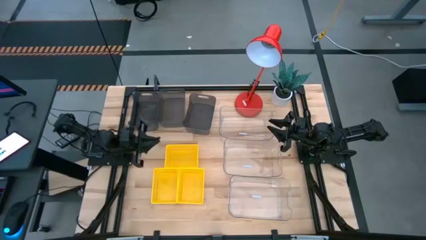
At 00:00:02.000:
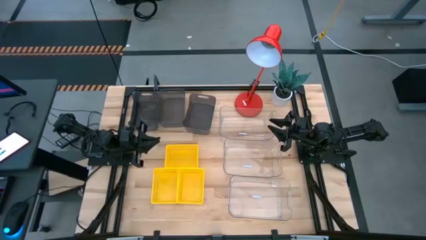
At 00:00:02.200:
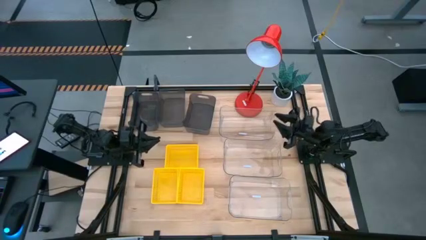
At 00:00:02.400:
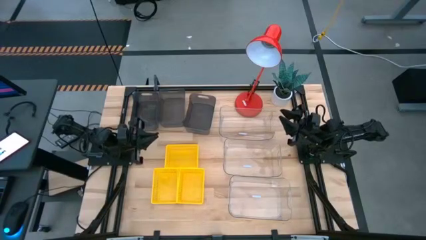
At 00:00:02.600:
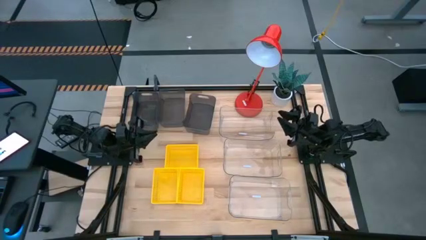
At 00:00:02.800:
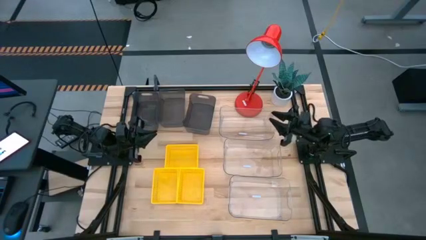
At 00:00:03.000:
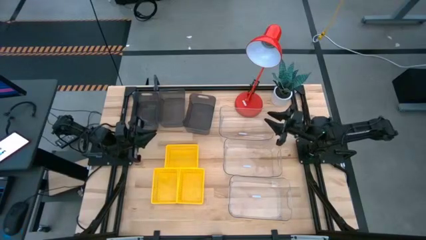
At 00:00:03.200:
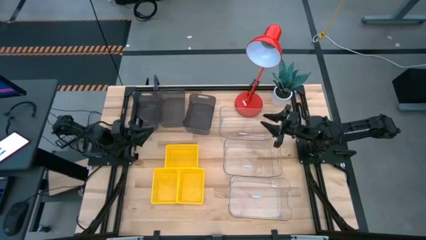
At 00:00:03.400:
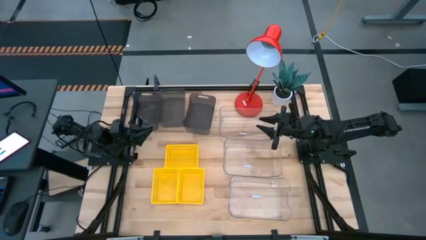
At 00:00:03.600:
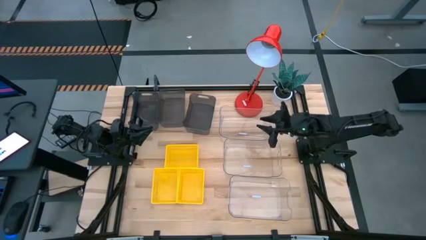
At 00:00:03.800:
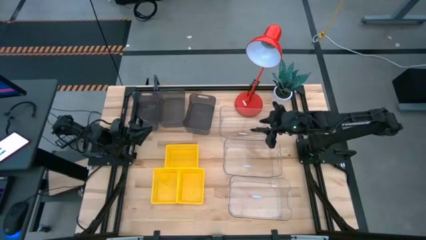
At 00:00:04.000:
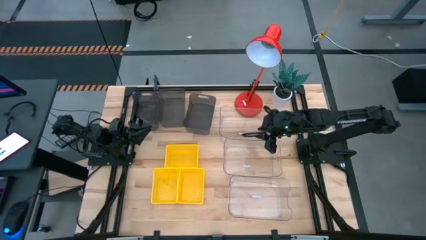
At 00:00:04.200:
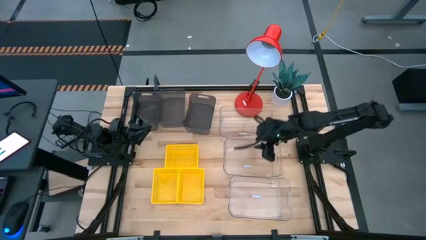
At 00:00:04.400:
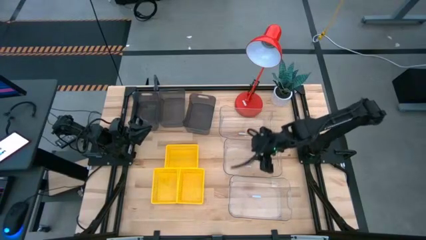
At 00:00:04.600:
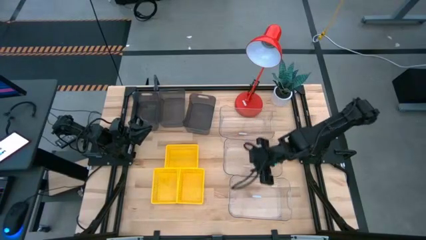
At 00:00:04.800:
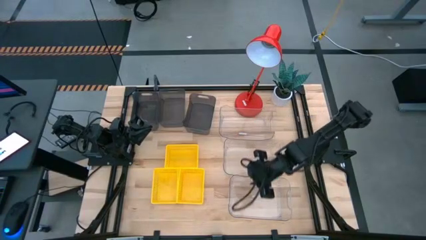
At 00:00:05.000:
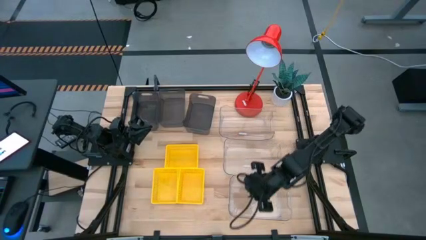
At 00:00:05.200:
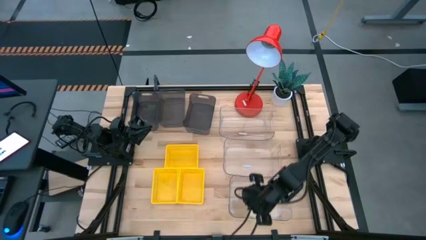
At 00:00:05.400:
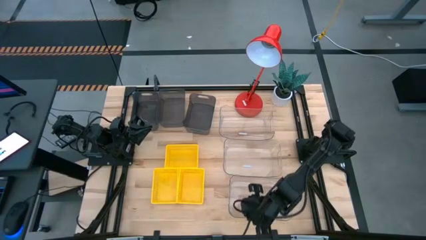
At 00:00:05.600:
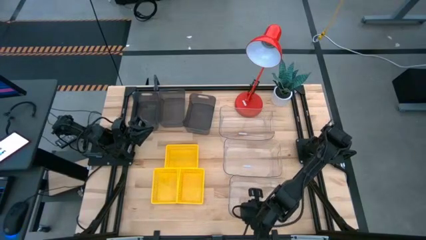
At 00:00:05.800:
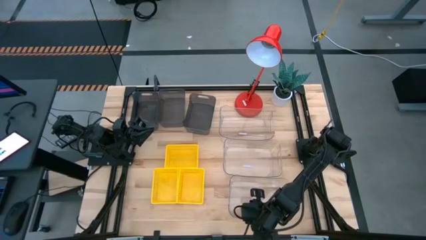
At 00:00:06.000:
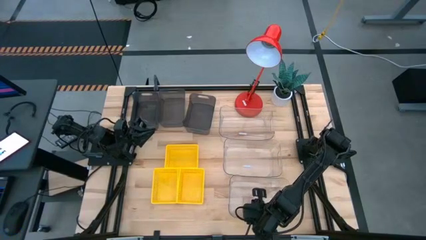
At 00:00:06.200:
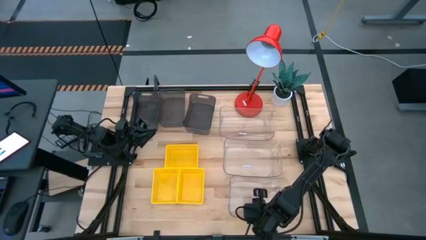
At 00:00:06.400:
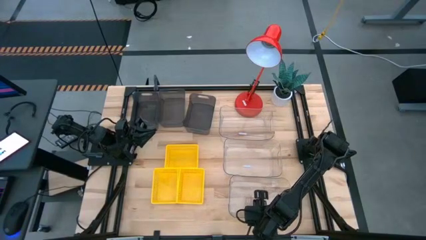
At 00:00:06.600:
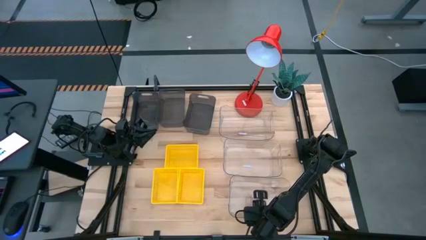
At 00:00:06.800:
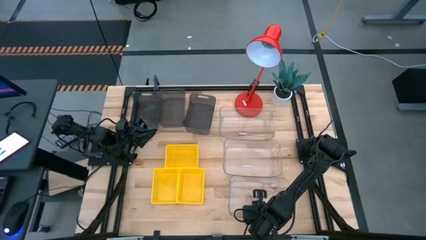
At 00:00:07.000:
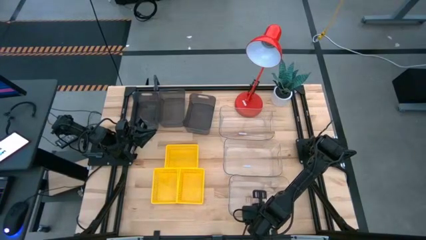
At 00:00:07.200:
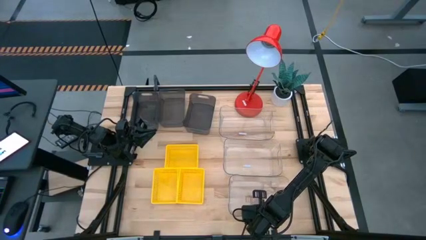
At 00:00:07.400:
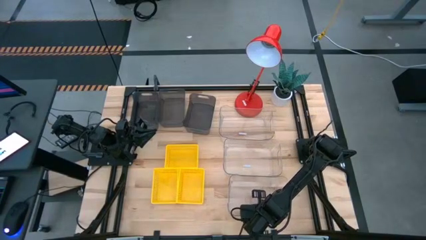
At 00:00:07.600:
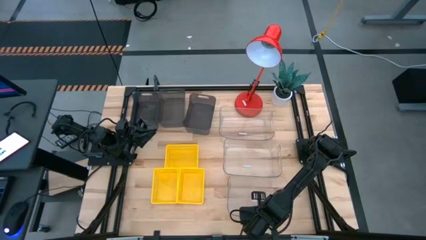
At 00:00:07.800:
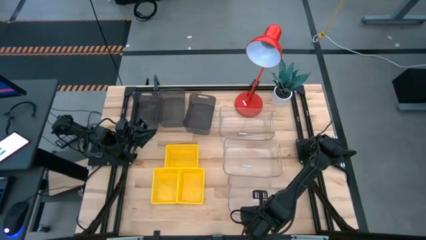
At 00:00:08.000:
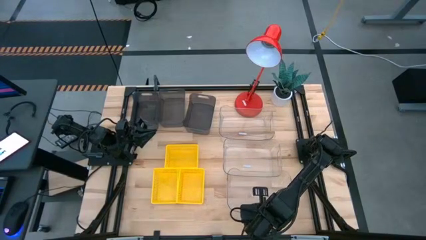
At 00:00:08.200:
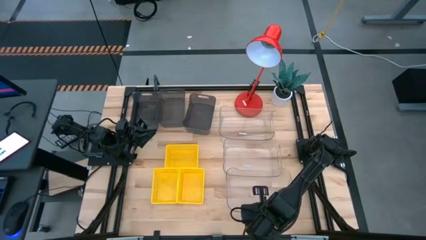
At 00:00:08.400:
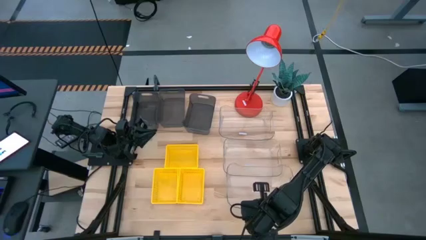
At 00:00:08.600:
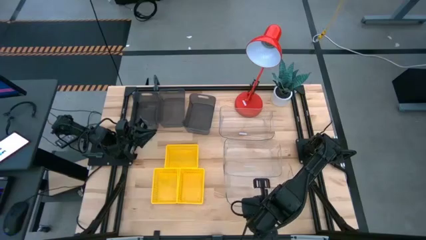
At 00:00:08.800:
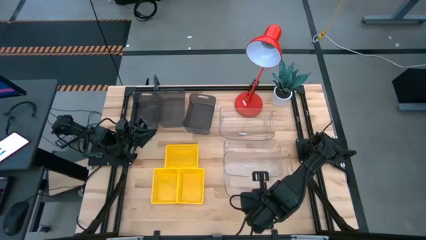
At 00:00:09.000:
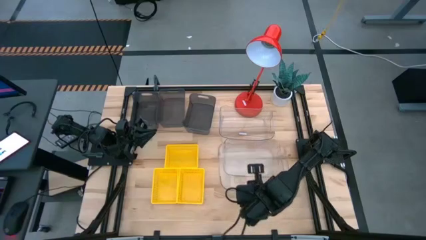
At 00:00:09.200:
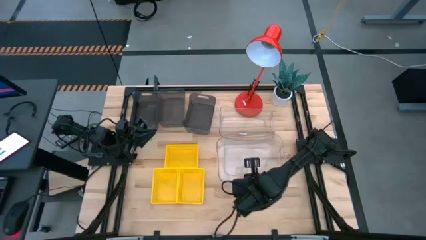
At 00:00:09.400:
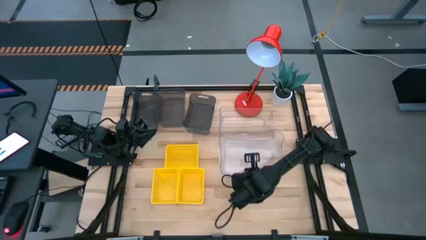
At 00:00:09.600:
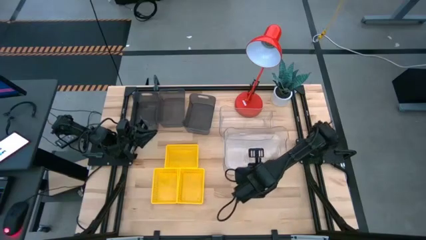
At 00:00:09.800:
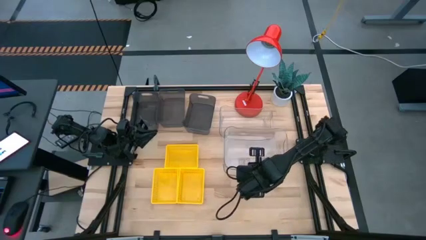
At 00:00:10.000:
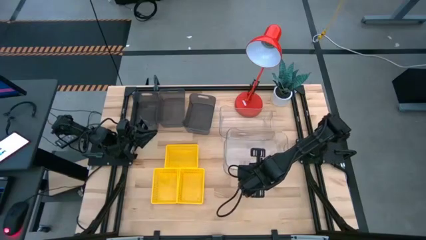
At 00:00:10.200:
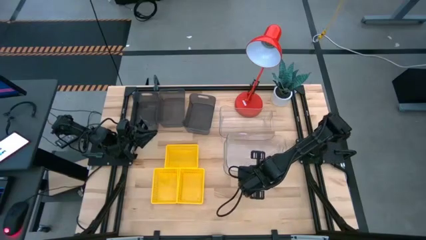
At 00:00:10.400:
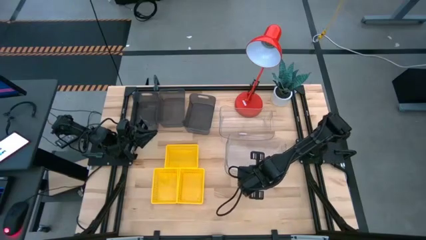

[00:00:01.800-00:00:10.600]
Stack the bottom transparent bin on top of the middle transparent bin

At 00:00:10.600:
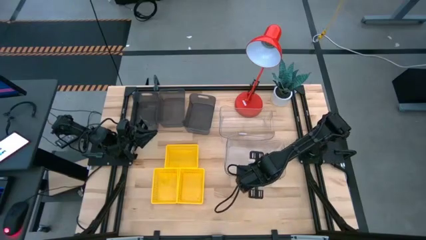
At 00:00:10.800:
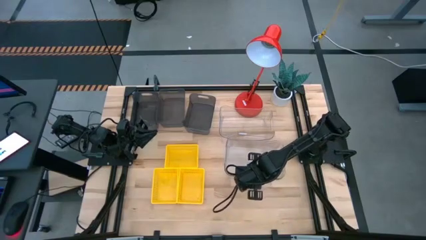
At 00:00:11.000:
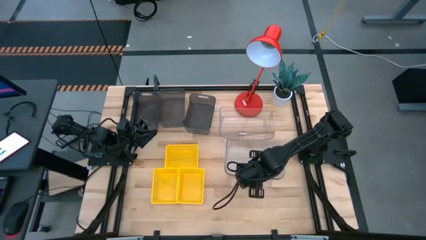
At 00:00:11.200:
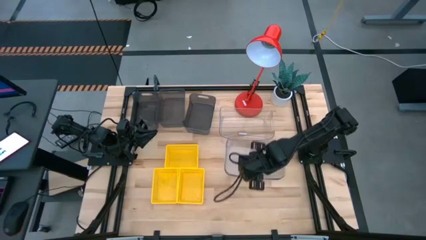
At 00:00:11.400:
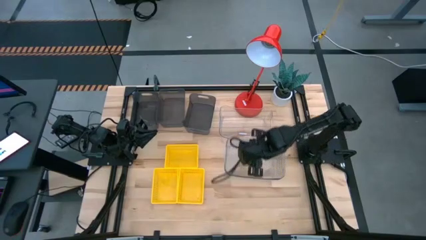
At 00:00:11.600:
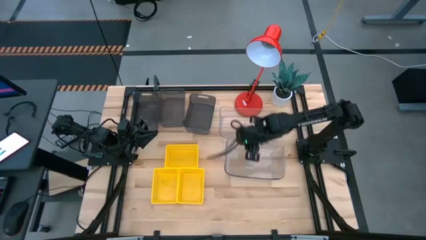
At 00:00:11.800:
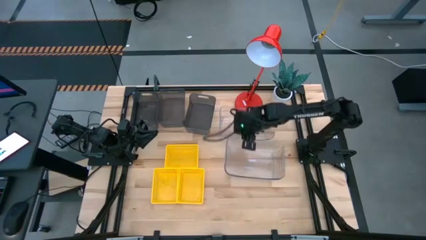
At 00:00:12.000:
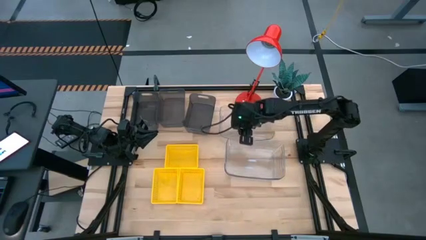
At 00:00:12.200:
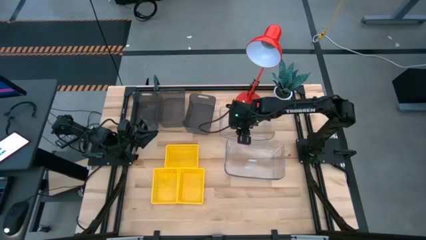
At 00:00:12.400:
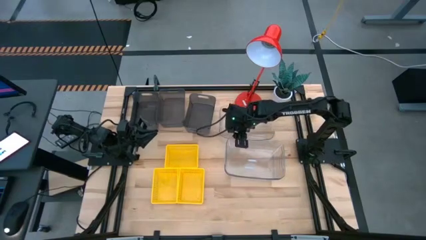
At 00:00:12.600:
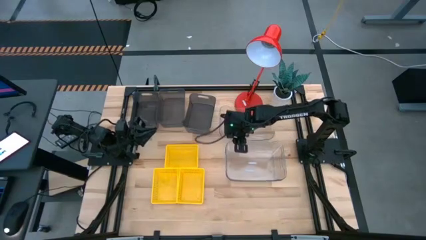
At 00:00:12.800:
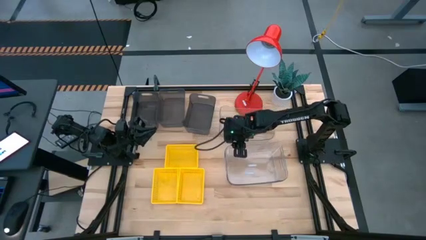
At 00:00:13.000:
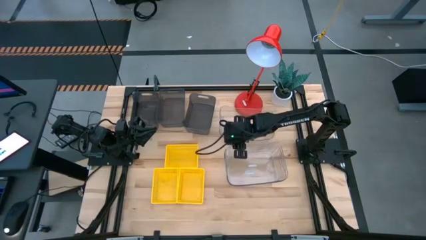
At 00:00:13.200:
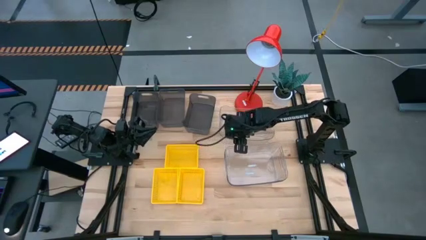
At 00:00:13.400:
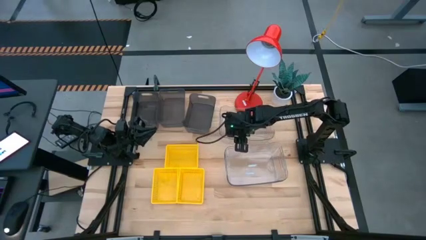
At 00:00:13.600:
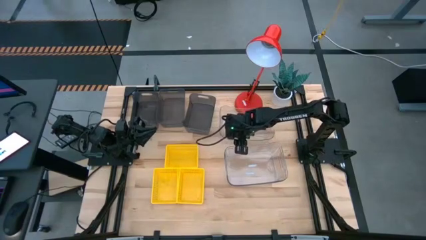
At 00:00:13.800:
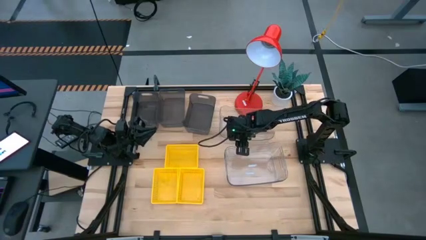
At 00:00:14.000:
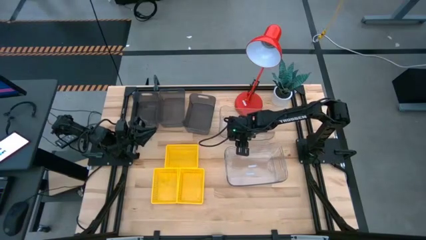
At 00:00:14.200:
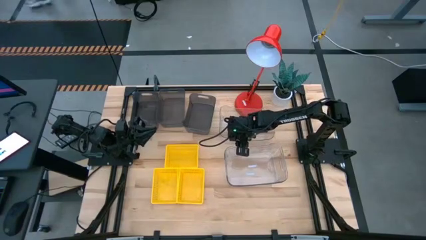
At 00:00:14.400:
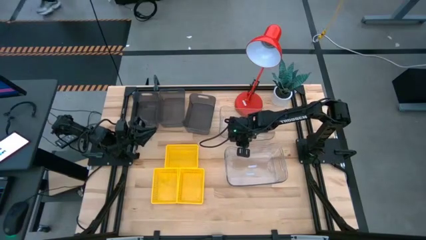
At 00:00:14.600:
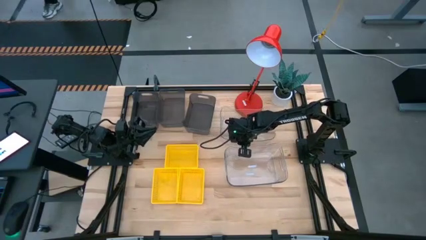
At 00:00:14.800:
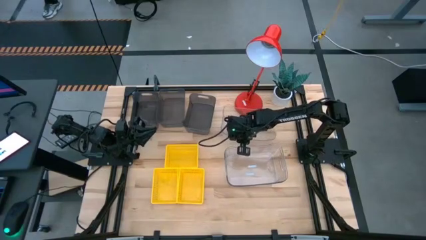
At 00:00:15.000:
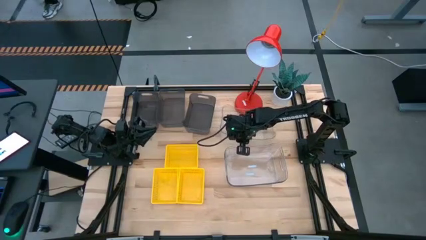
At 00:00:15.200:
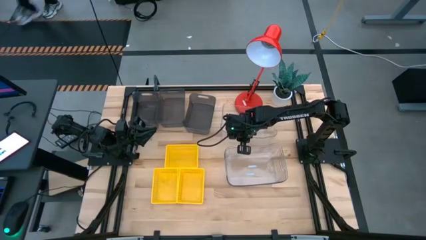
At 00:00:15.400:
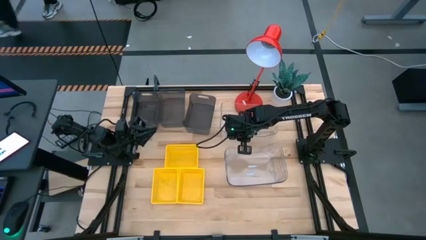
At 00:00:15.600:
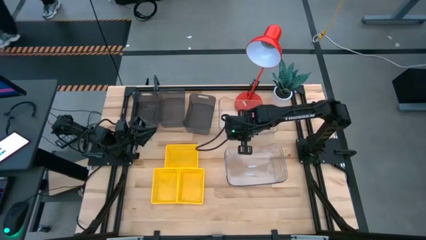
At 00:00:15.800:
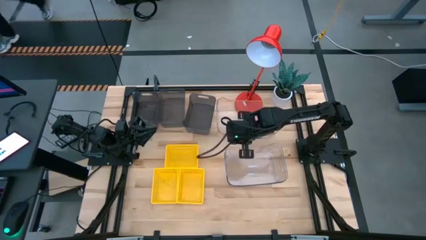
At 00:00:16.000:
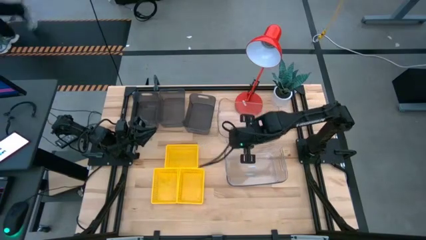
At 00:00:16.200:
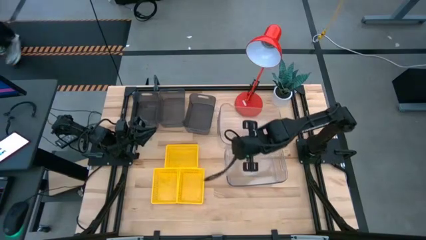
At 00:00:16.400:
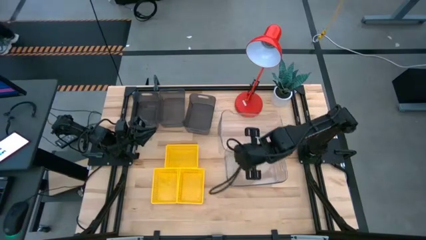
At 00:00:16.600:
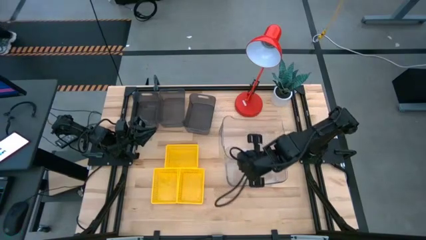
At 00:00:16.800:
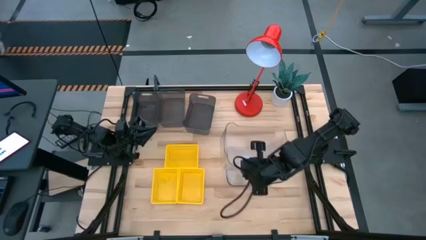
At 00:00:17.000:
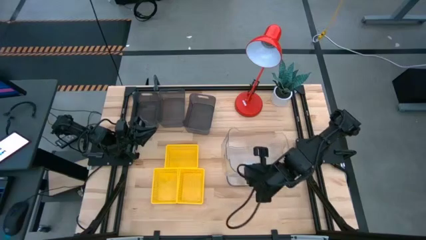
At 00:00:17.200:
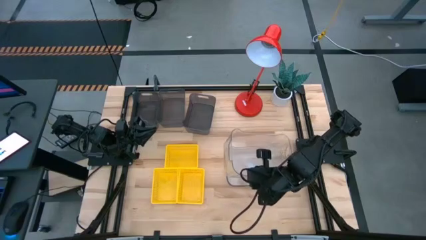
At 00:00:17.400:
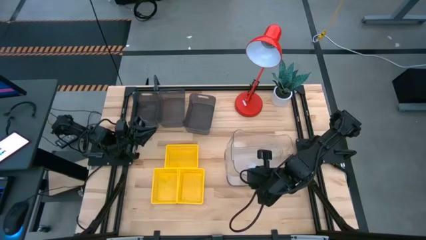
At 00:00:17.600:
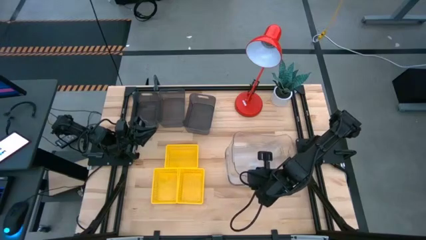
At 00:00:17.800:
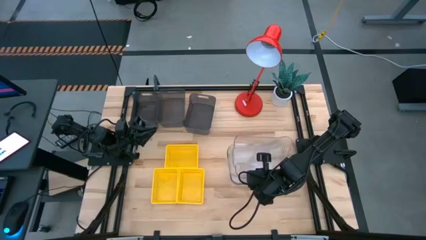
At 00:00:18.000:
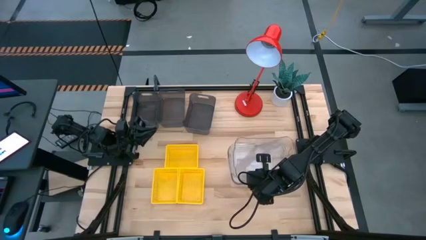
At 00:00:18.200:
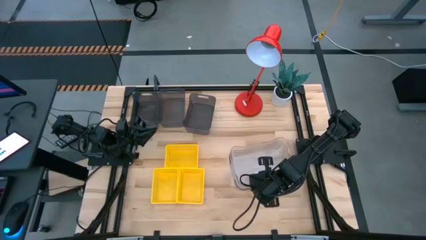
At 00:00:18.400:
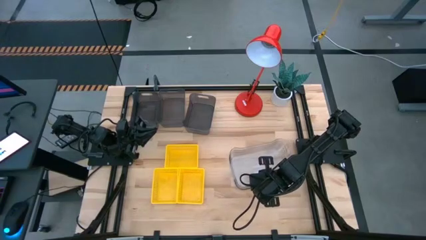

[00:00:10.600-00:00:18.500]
Stack the top transparent bin on top of the bottom transparent bin
